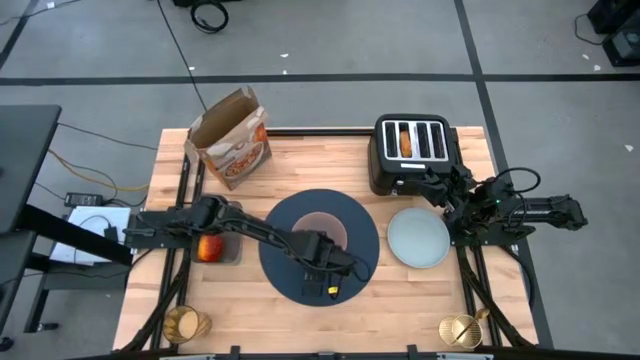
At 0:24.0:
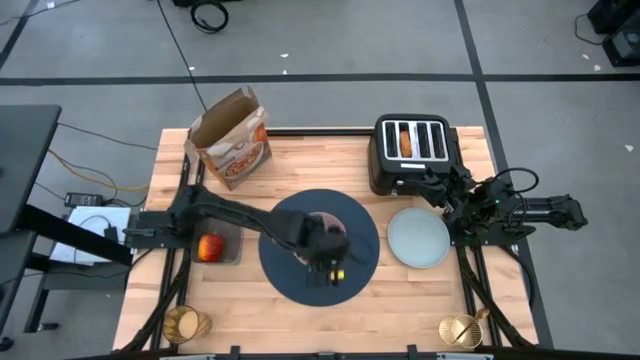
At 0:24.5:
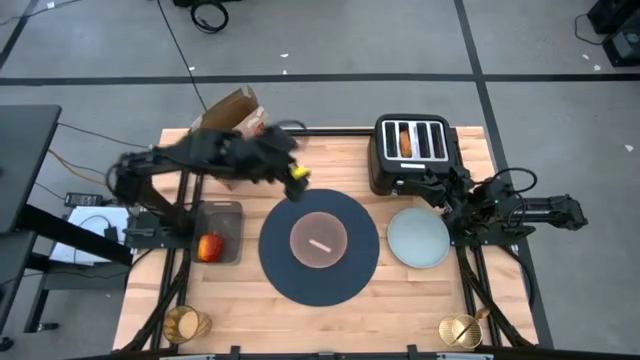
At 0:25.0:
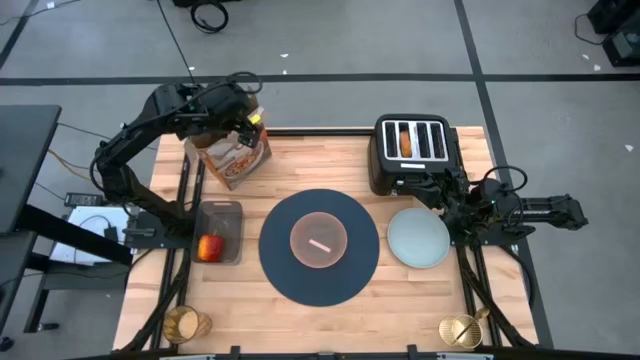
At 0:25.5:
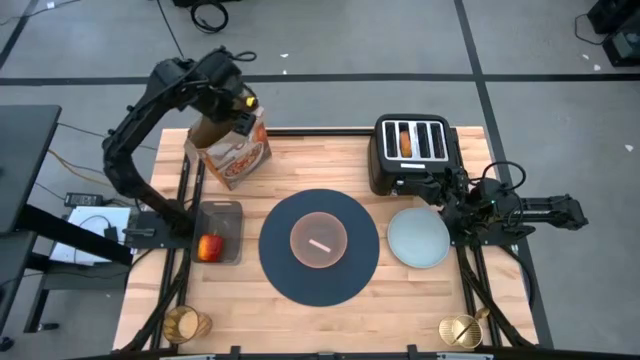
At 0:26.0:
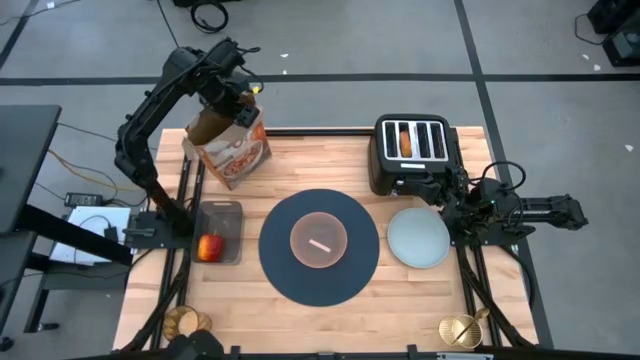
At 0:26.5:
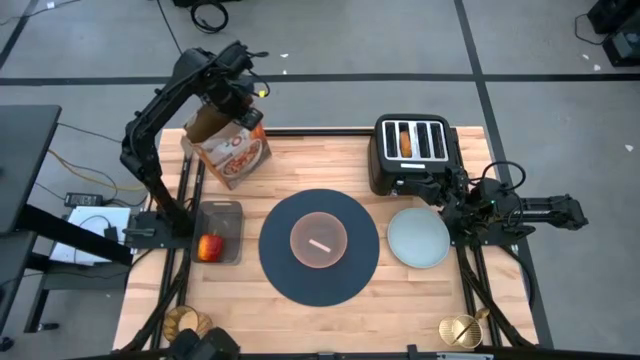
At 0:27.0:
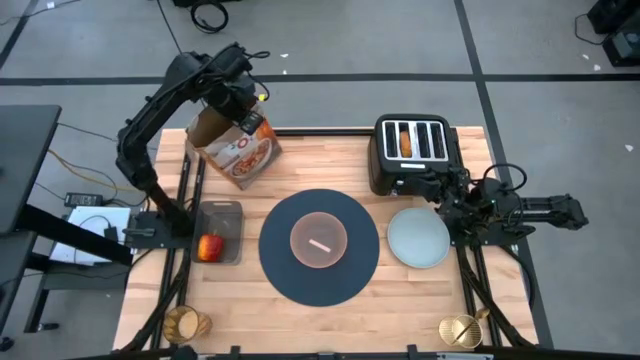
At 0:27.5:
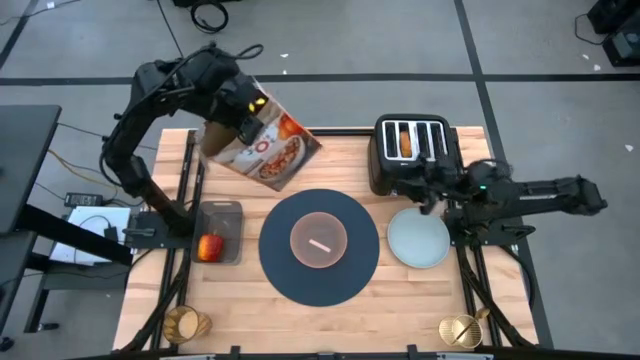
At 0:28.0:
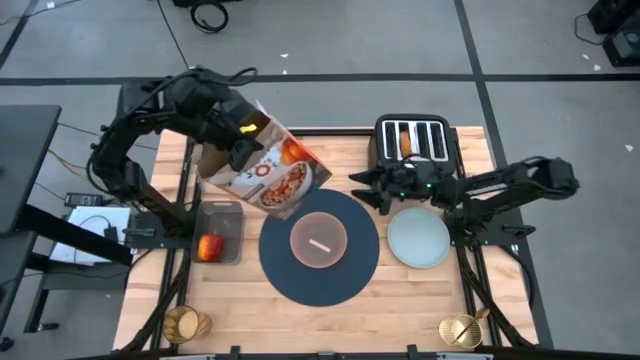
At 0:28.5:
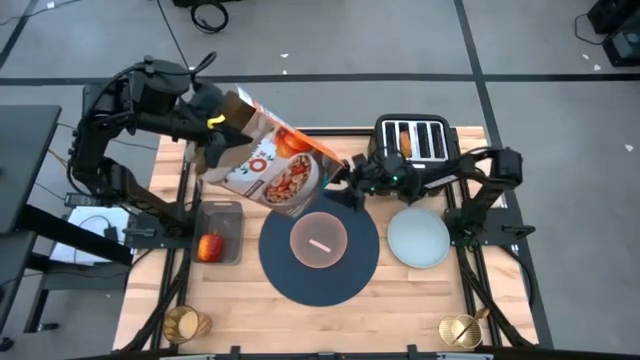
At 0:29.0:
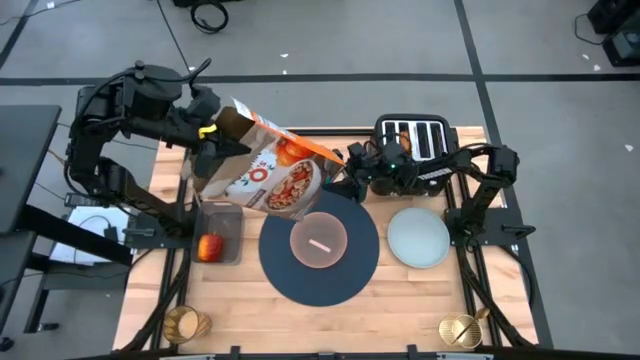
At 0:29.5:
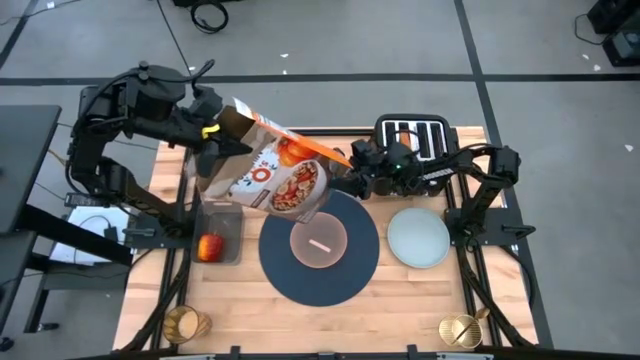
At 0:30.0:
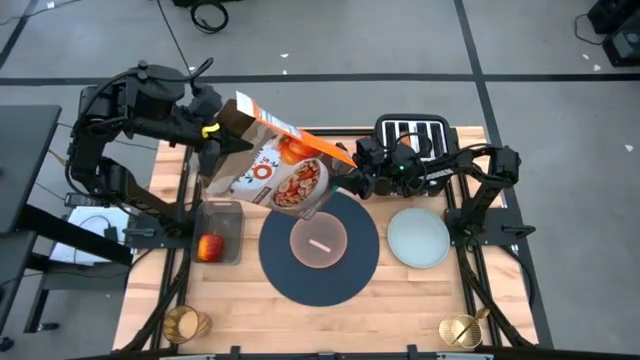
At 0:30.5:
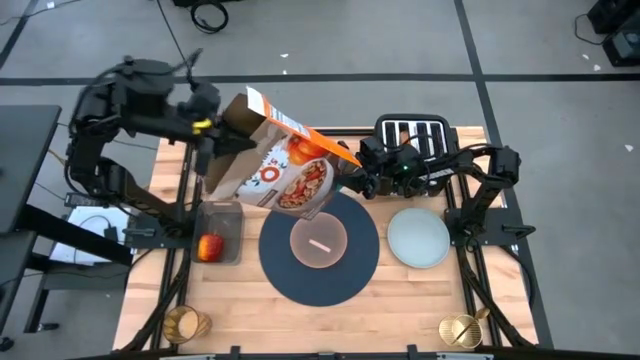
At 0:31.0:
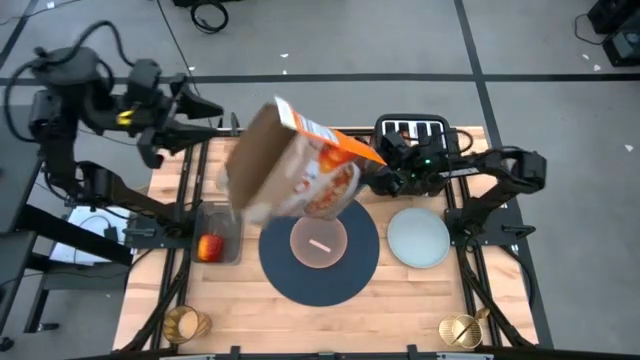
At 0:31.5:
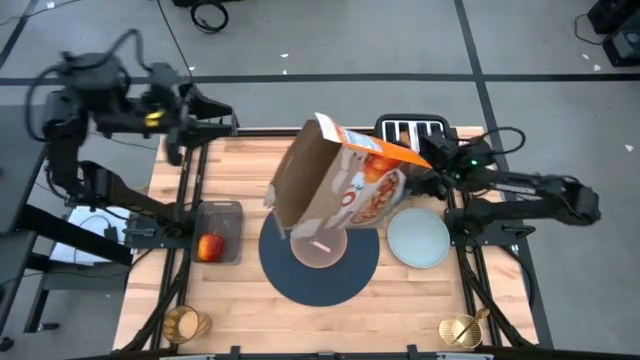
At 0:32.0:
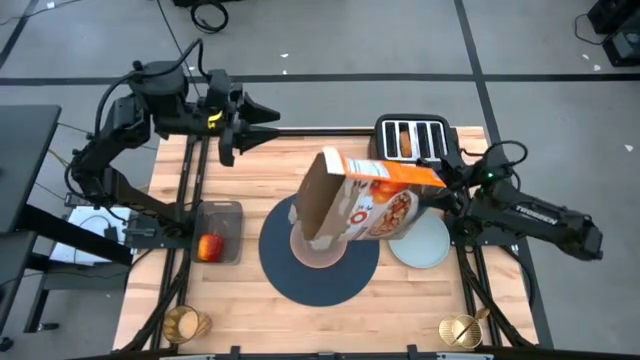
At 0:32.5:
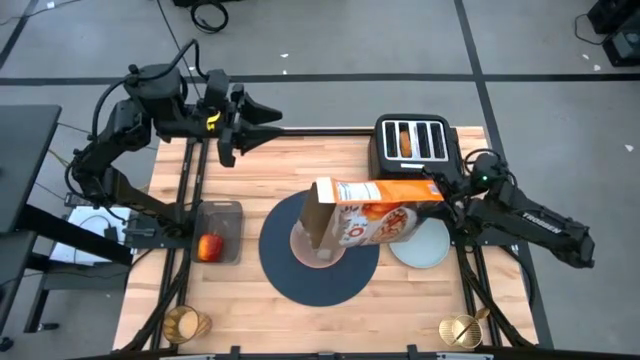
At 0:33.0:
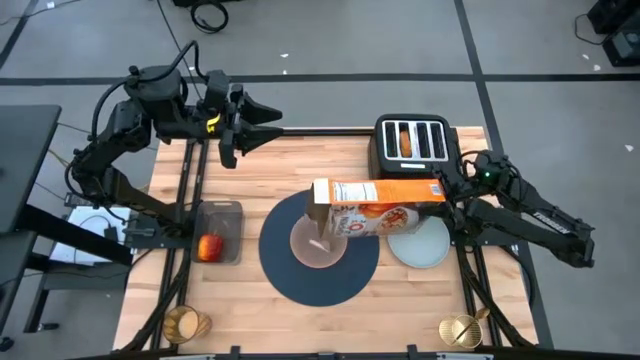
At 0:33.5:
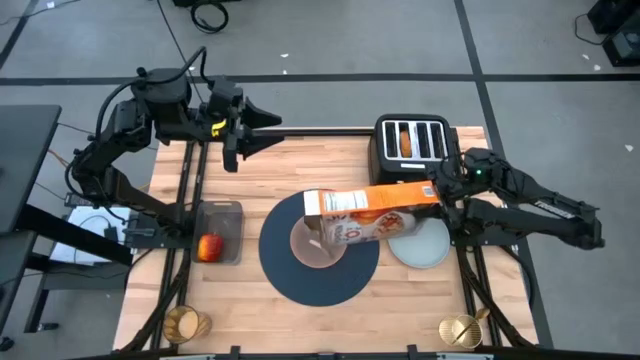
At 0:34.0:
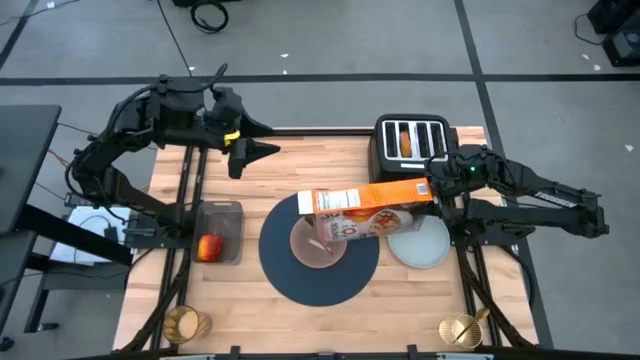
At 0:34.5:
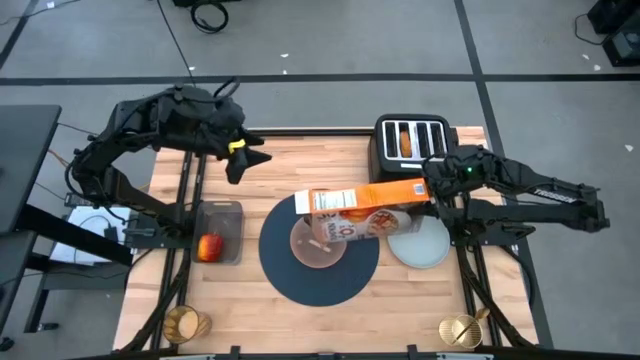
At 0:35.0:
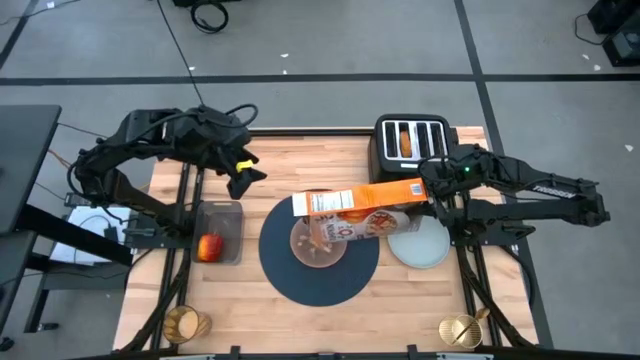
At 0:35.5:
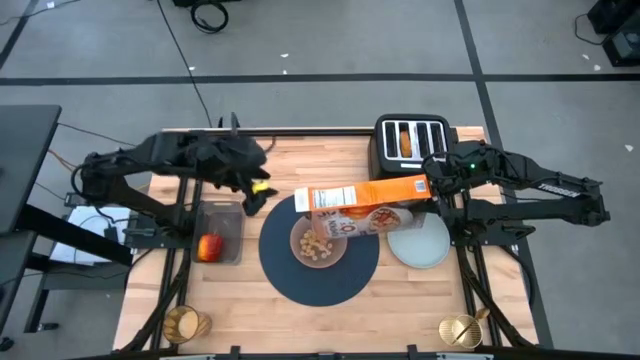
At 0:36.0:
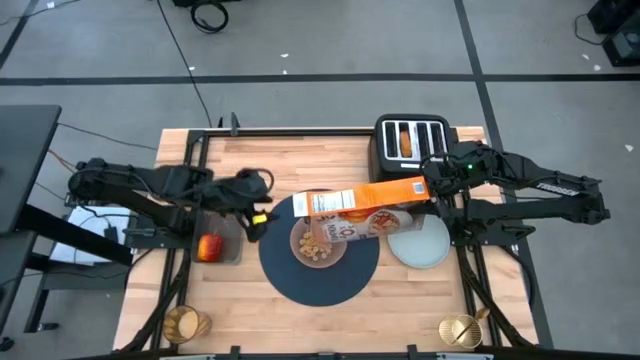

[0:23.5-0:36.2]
Task: Arrange a breakfast setting
Pour the cereal from the orange cereal box into the orange bowl

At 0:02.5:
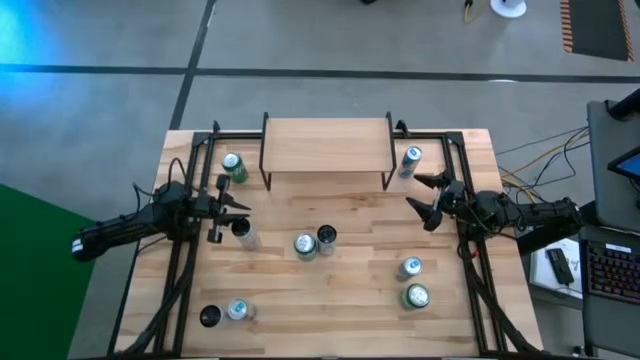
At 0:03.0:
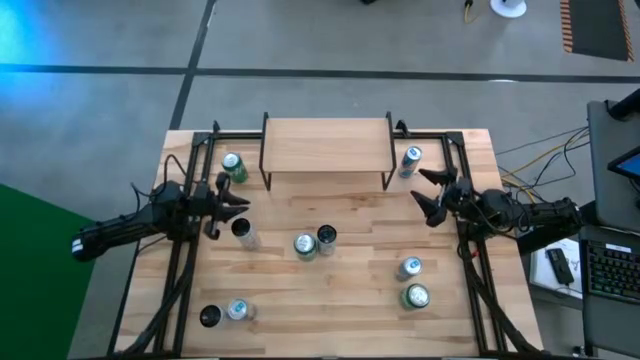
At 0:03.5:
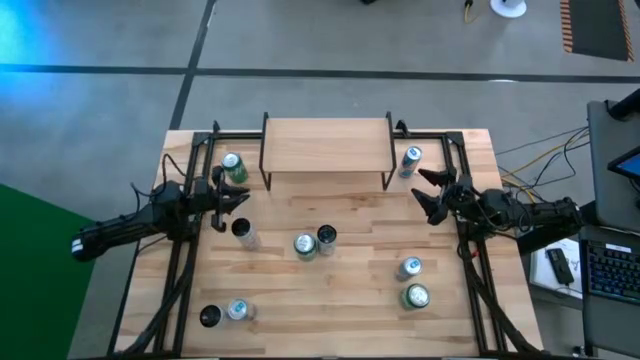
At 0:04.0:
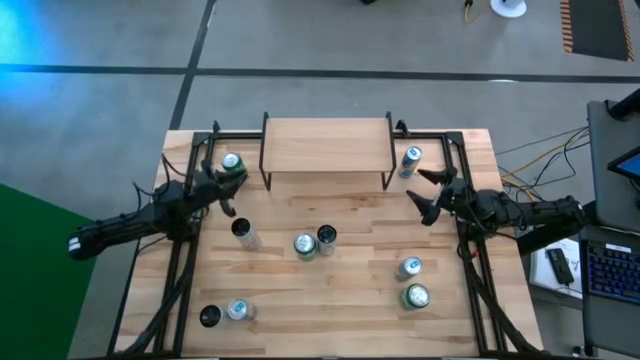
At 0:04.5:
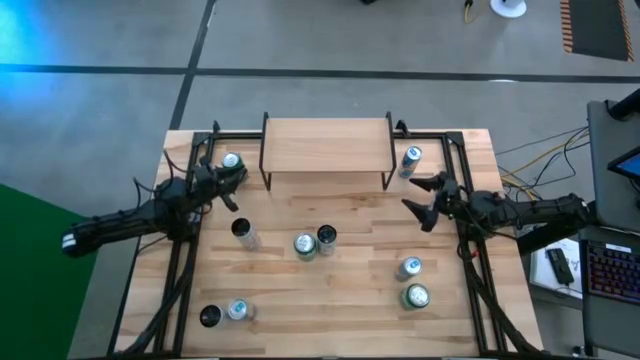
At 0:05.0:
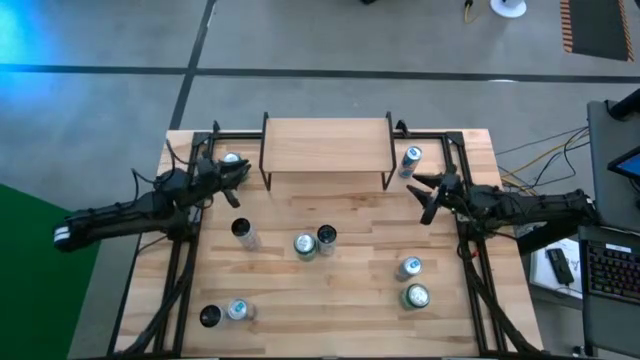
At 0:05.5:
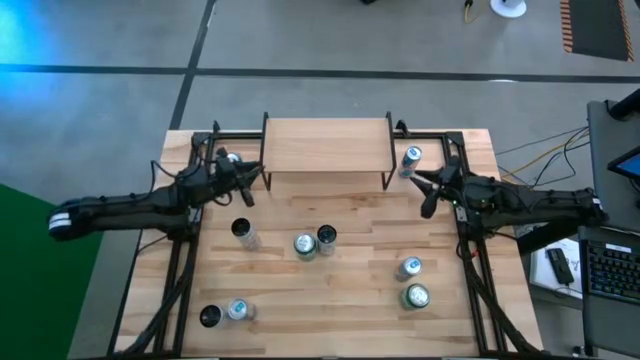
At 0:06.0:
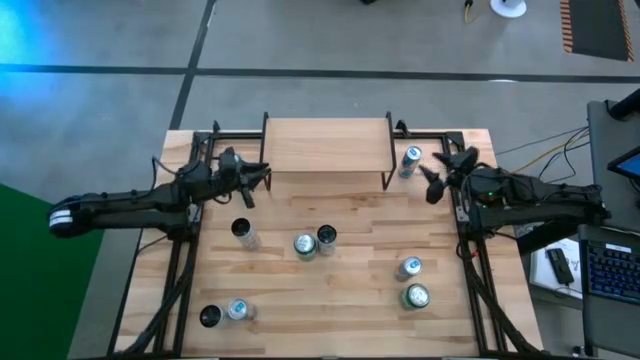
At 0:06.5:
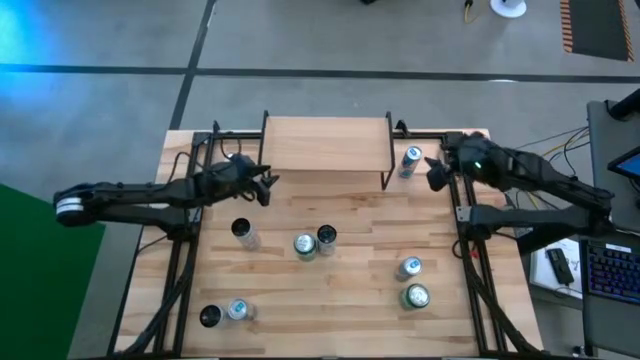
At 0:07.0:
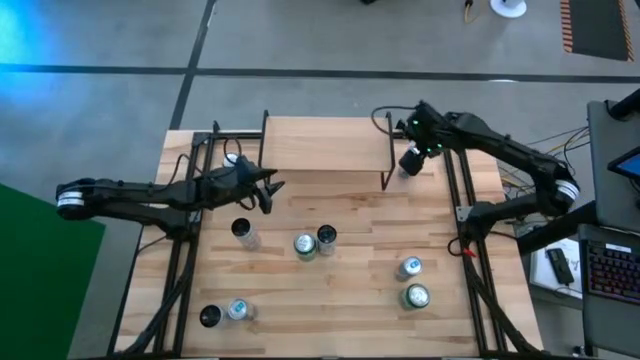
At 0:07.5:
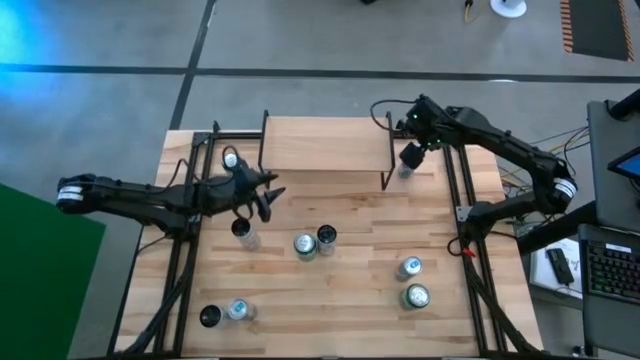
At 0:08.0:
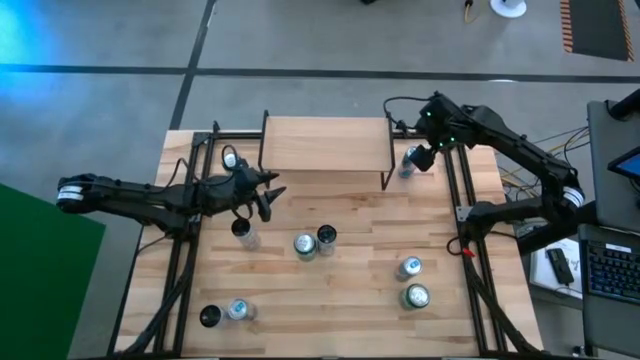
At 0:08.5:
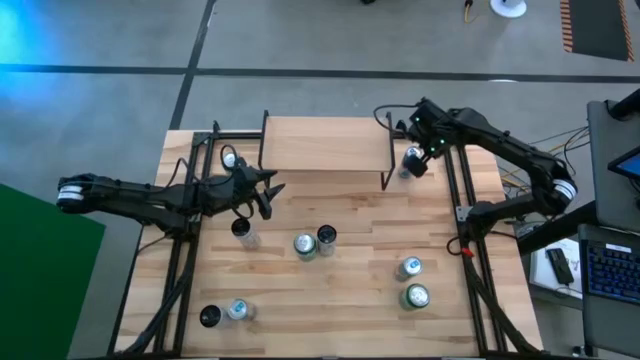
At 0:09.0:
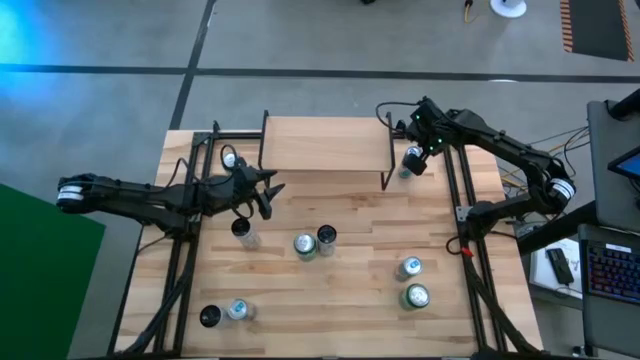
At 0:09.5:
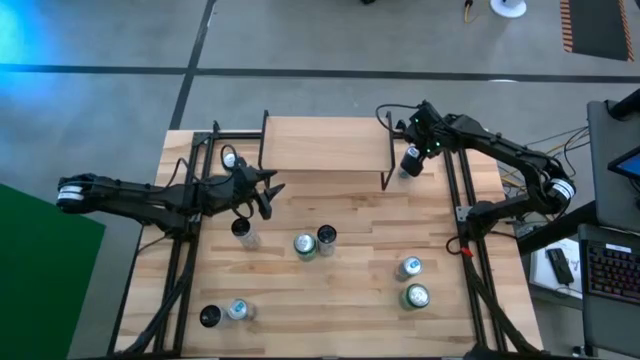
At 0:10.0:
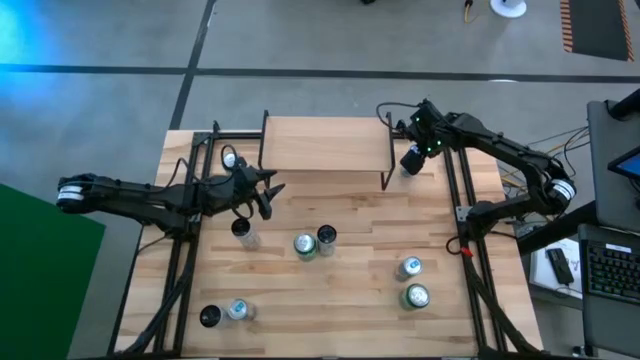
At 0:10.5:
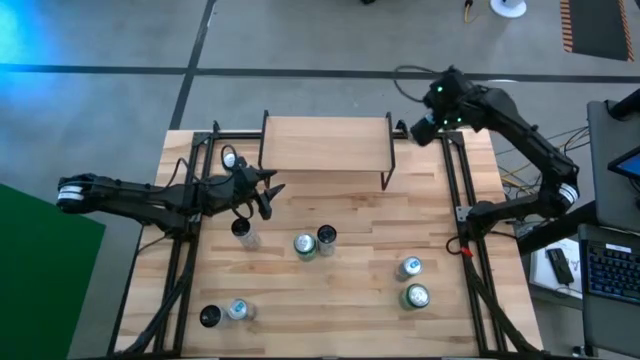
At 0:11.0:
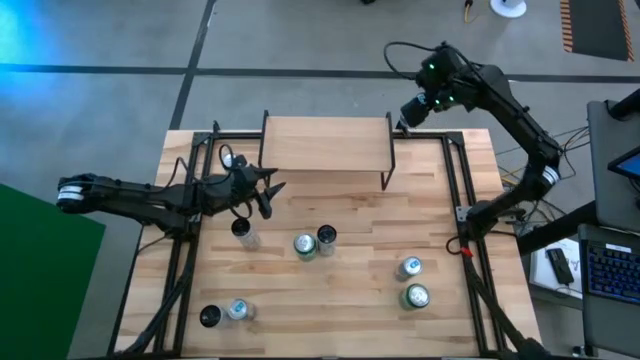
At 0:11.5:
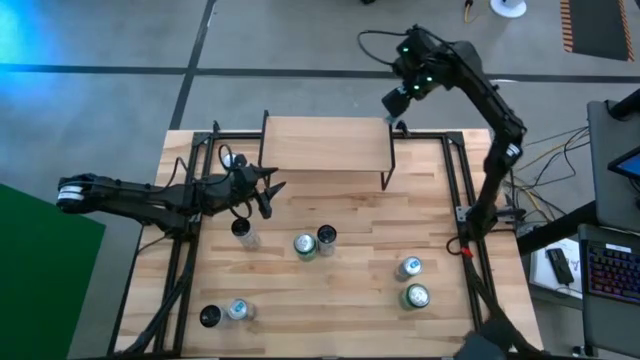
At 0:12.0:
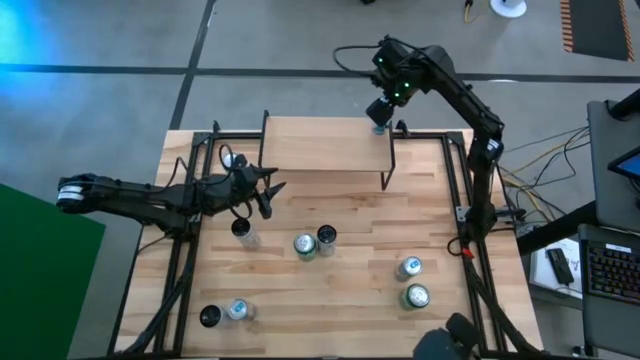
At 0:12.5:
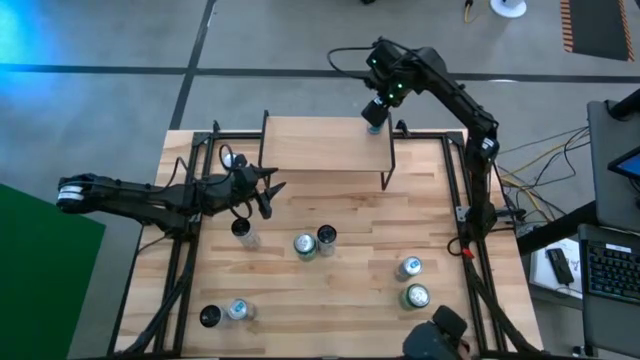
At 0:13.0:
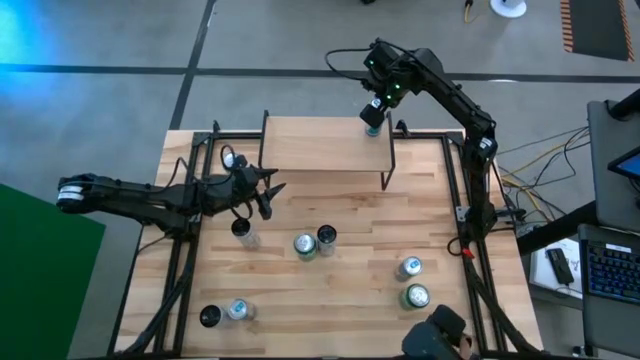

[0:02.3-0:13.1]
Task: Sort soda cans
Put the top right blue soda can on the shelf
